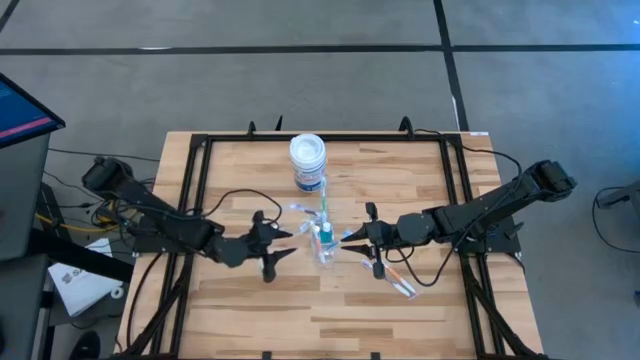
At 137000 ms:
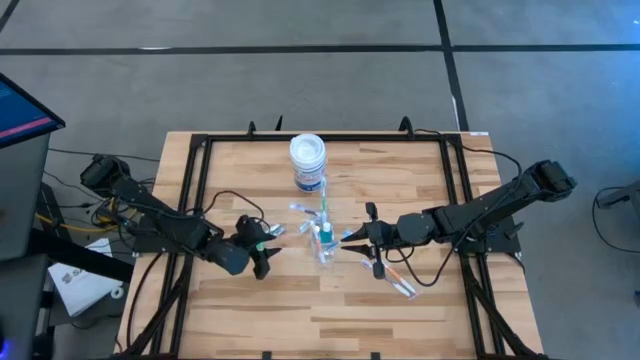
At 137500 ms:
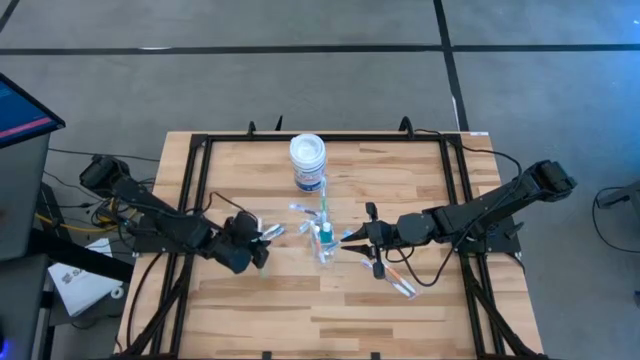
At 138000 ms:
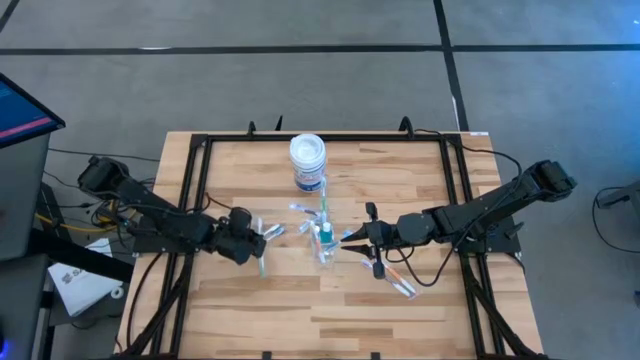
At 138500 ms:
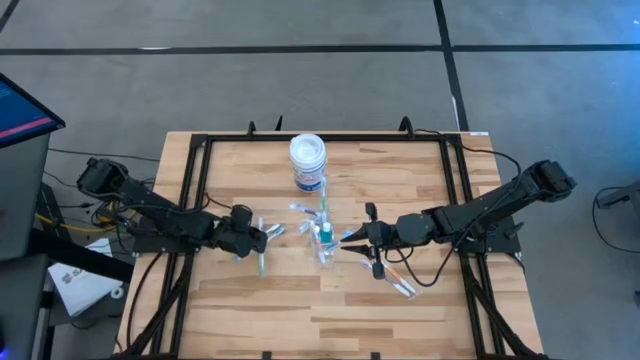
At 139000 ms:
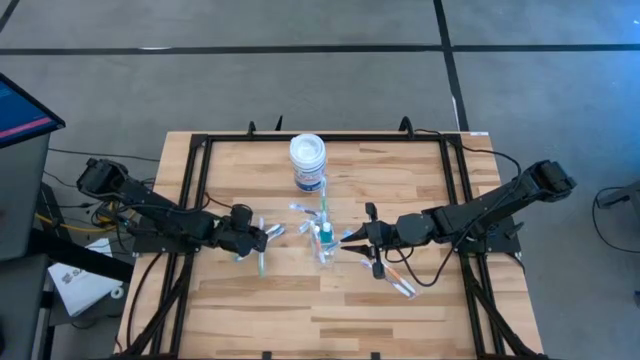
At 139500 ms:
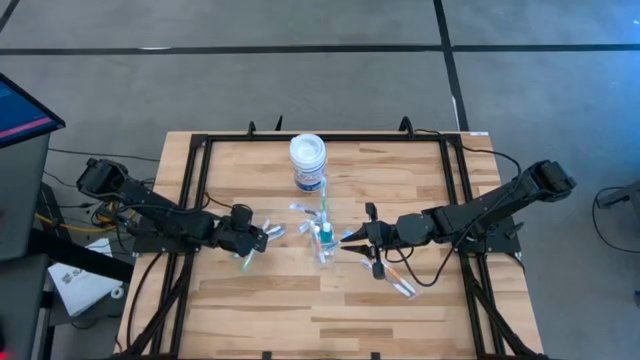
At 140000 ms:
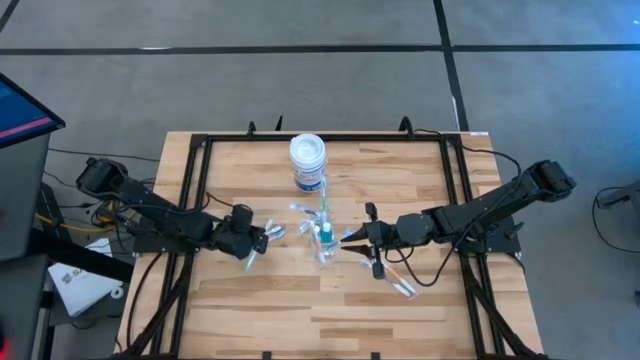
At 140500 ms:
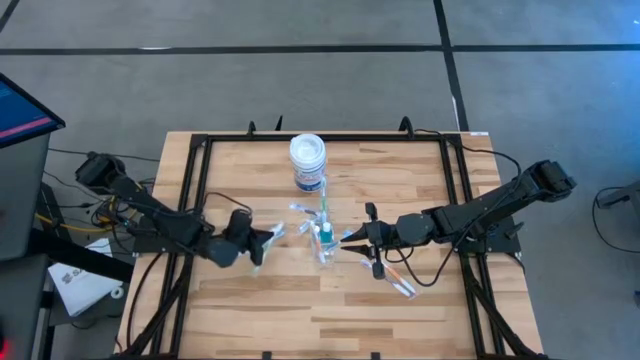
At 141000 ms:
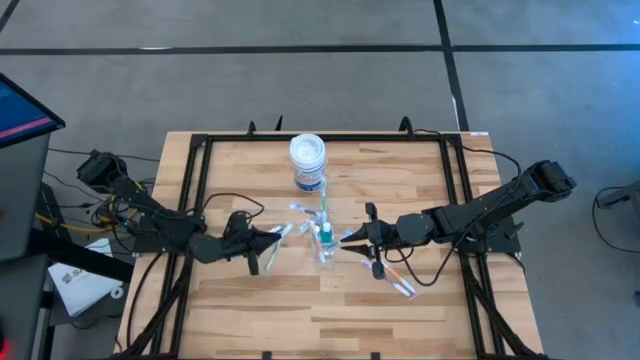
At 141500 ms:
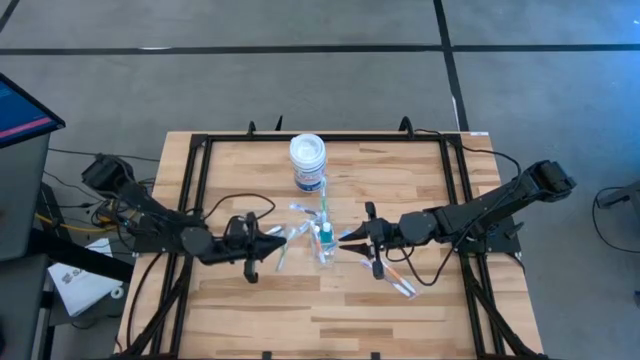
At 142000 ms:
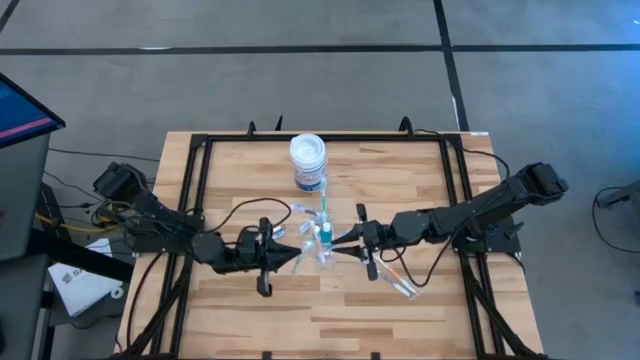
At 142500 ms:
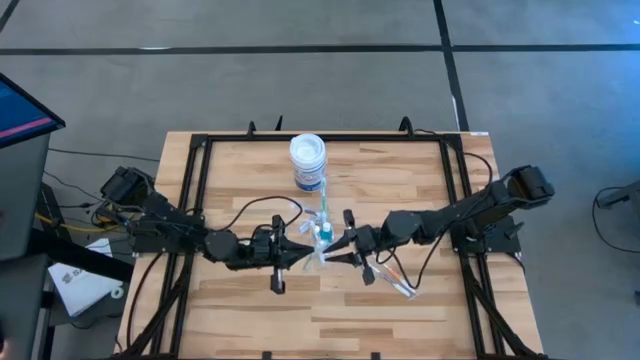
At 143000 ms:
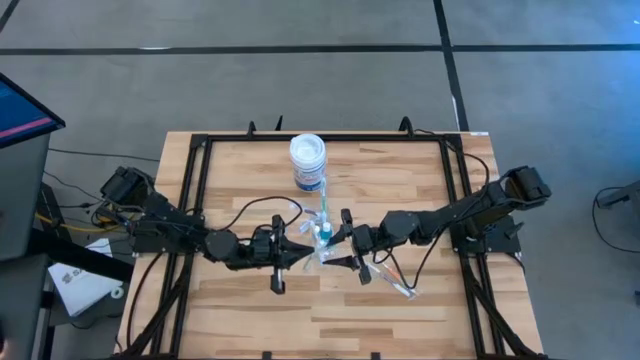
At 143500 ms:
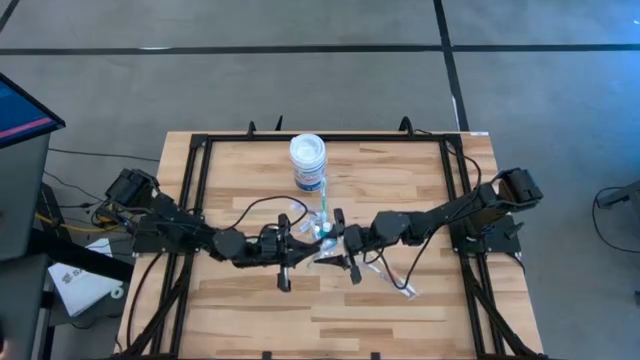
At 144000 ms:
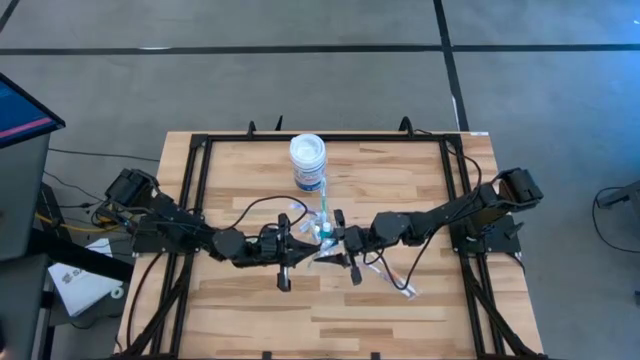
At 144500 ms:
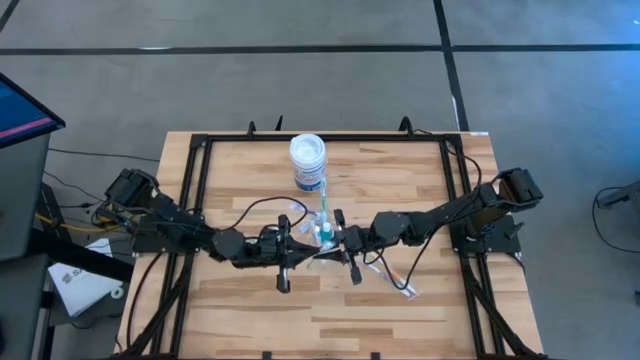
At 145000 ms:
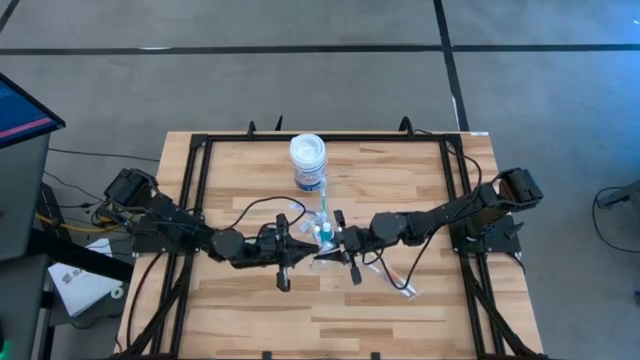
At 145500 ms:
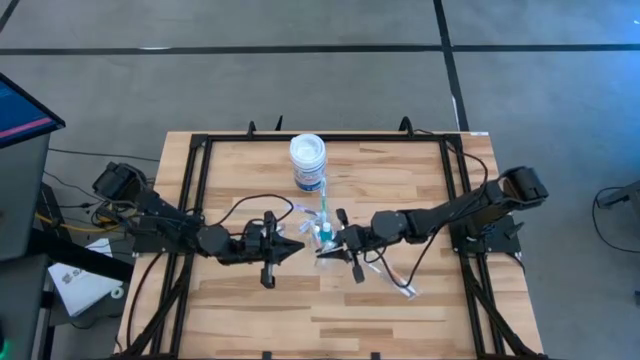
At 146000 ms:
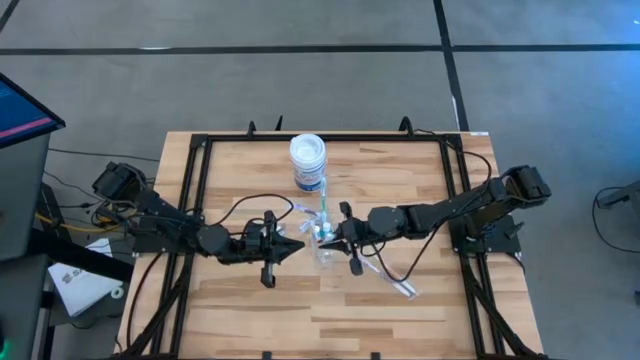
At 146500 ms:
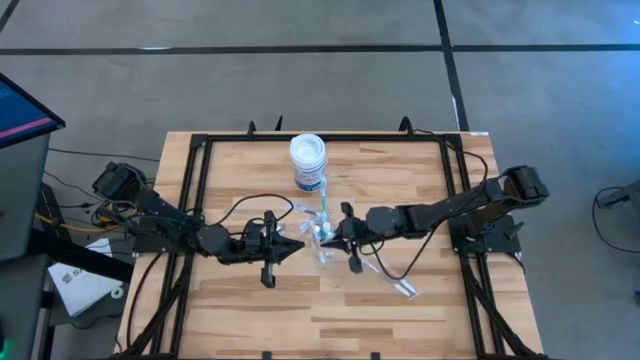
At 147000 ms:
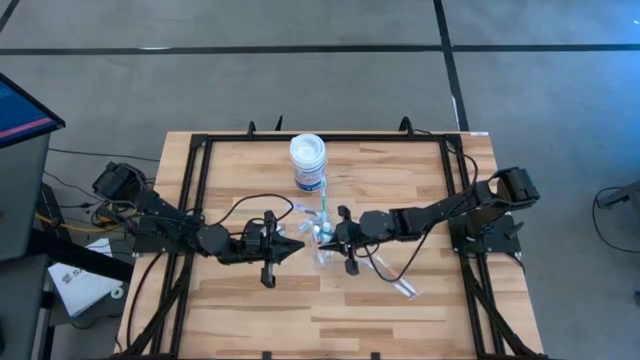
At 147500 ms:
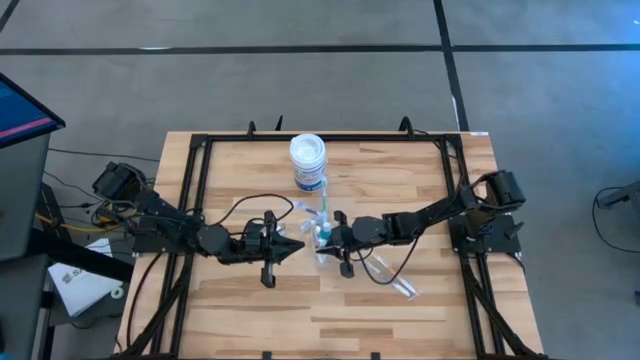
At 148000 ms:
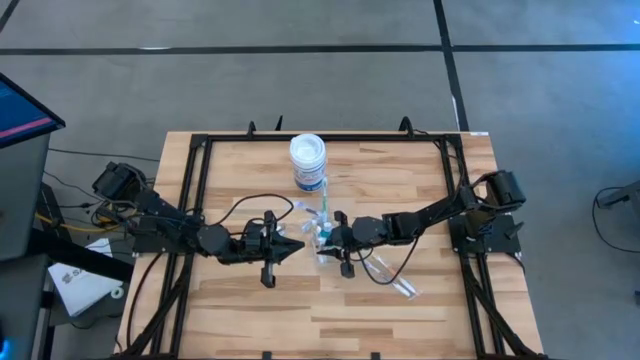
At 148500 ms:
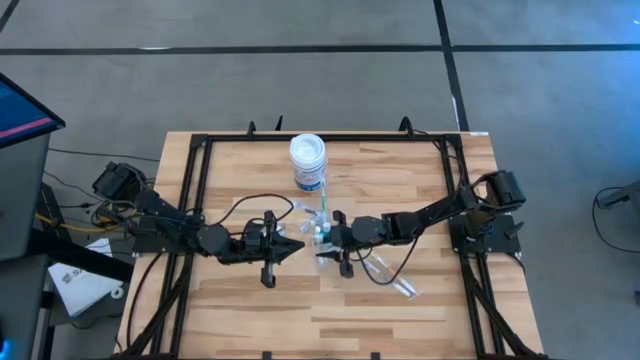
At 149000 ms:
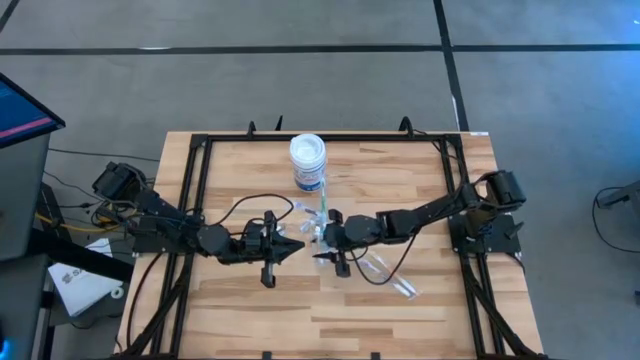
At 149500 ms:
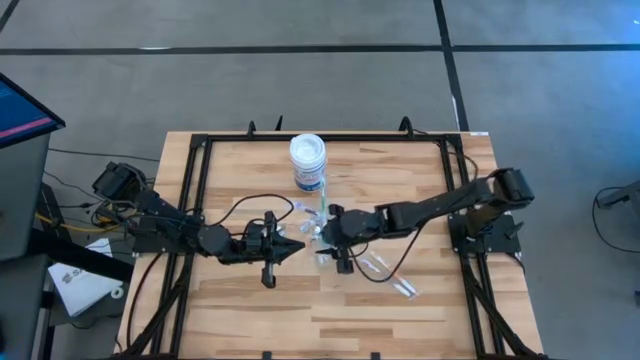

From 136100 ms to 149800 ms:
Task: Pick & Place toothbrushing station
Put the bottom green toothbrush into the Transparent organizer

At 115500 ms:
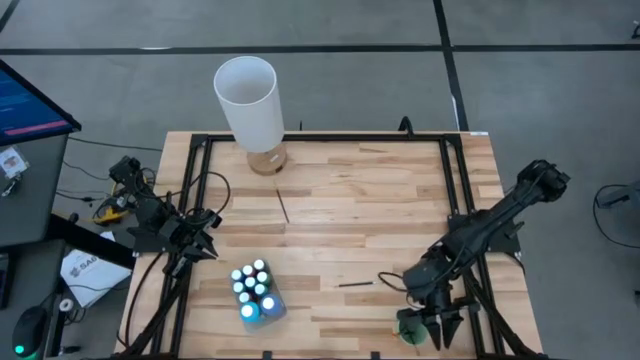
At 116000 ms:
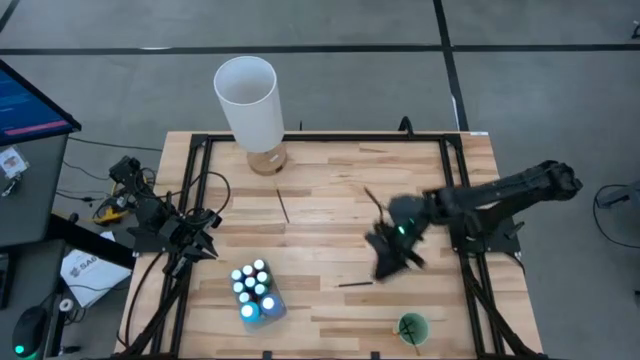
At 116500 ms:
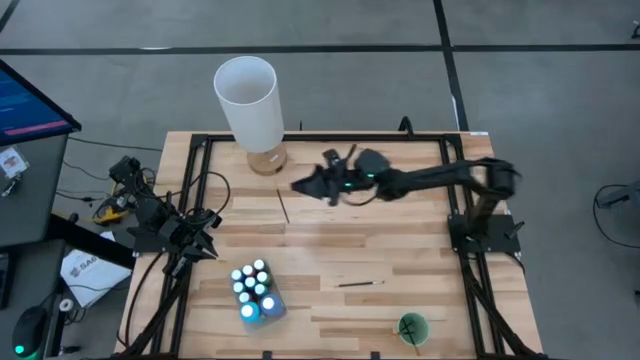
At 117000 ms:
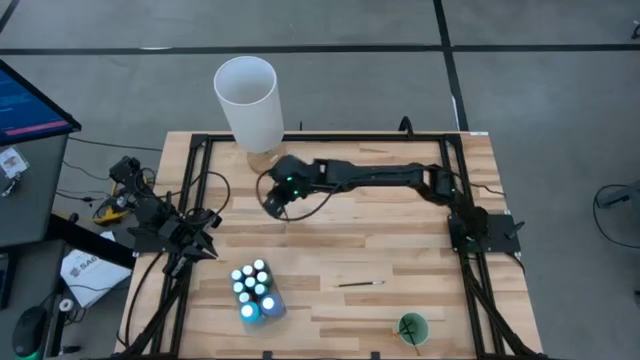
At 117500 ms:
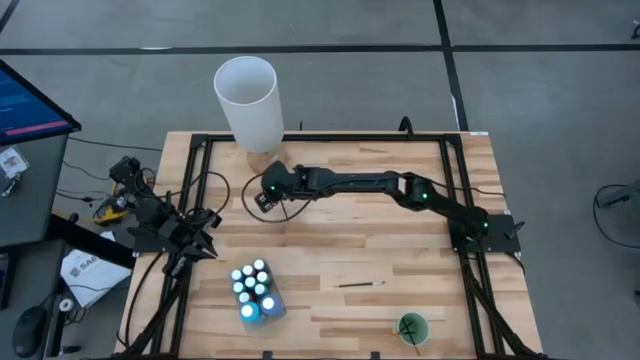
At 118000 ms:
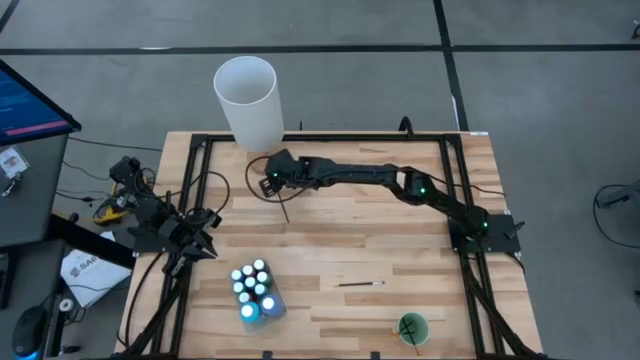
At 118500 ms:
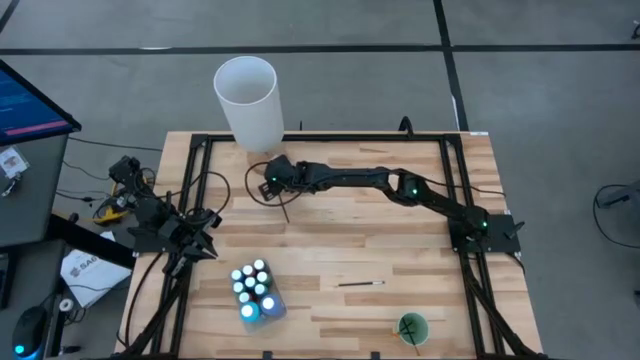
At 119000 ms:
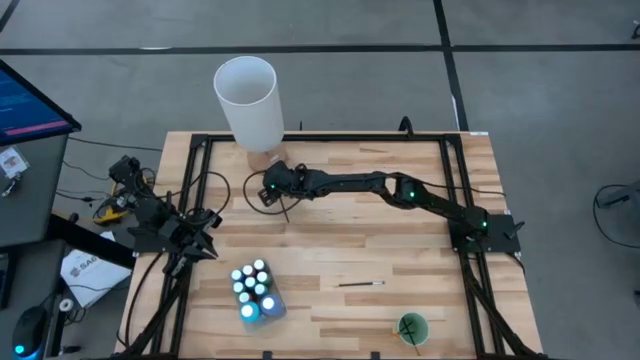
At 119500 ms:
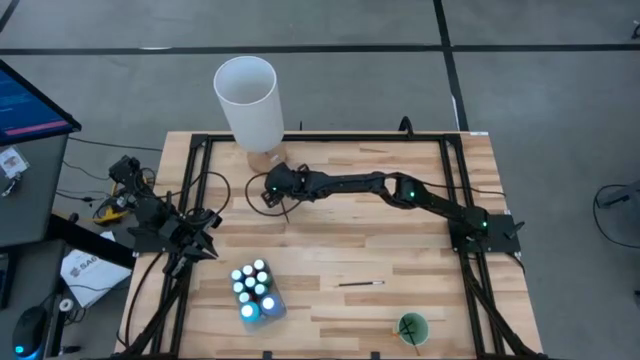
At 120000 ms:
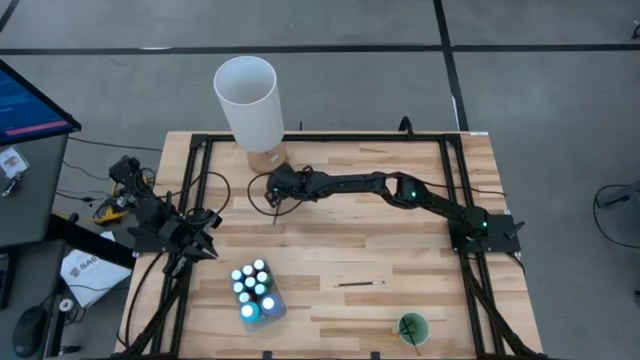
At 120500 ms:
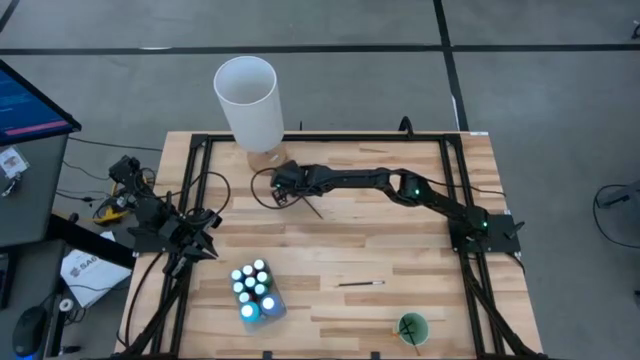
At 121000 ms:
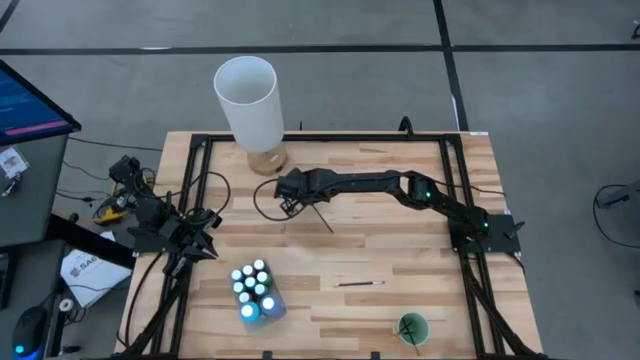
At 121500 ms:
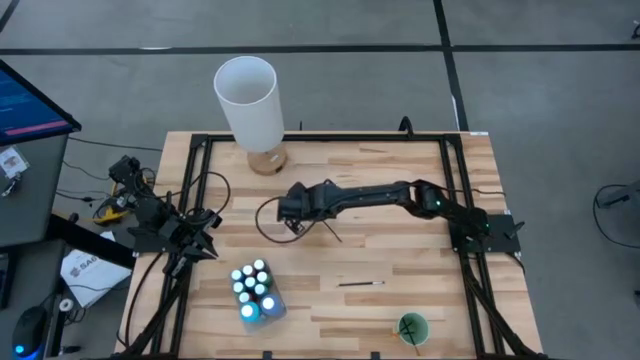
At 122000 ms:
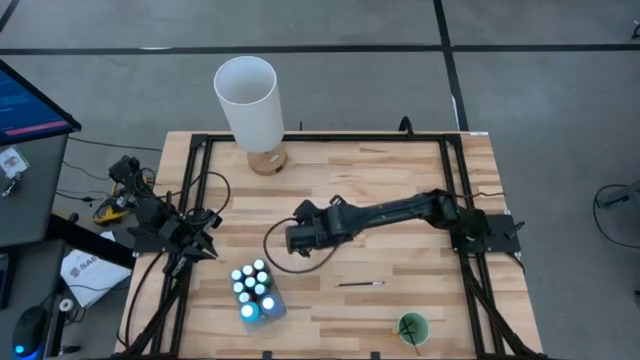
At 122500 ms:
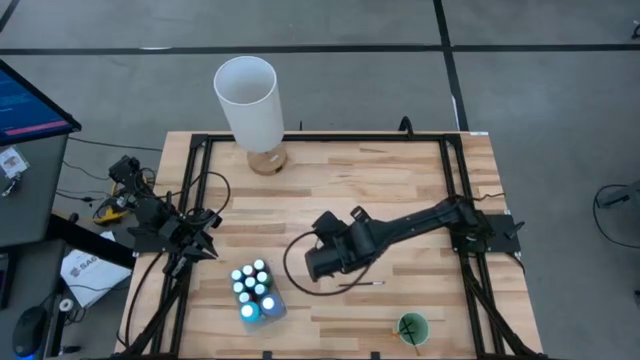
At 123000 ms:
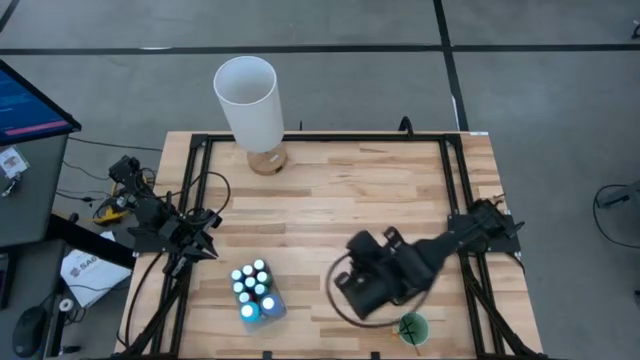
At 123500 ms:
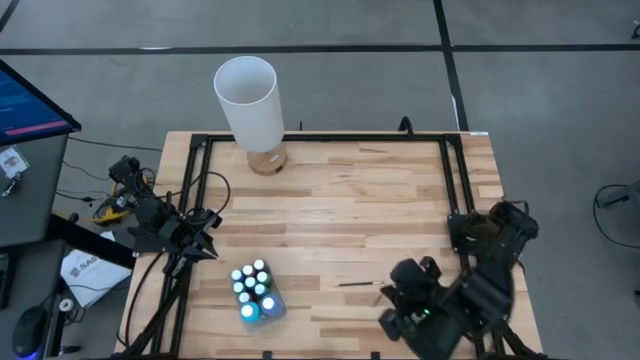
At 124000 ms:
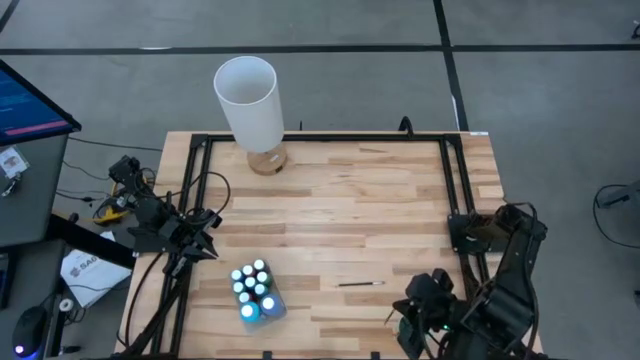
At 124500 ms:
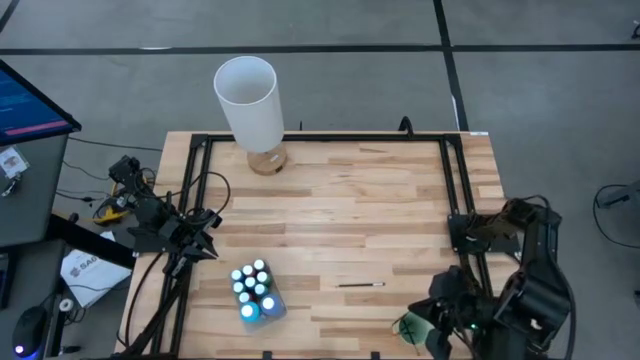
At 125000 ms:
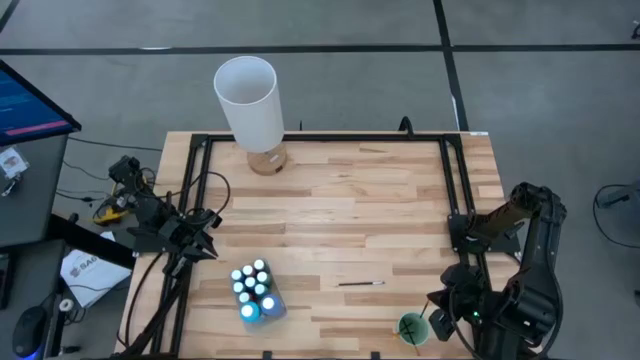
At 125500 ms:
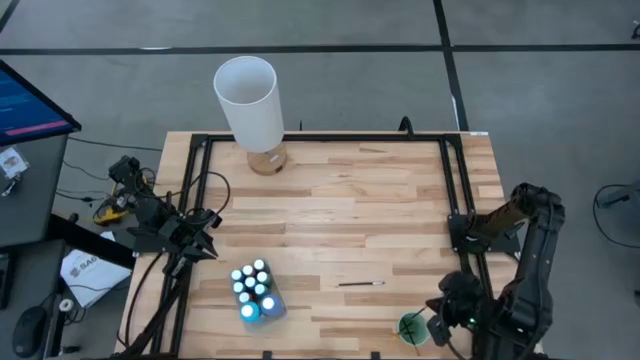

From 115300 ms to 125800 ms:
Task: Pick & Place Paint Supplies
Put the gold paint brush into the green cup
